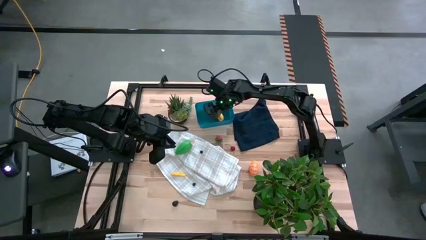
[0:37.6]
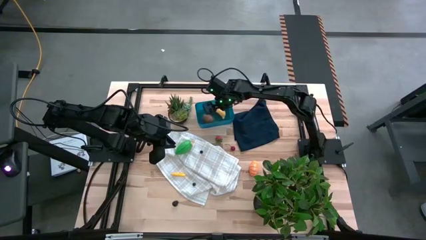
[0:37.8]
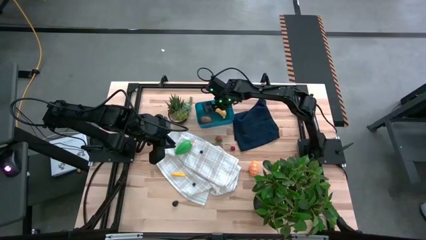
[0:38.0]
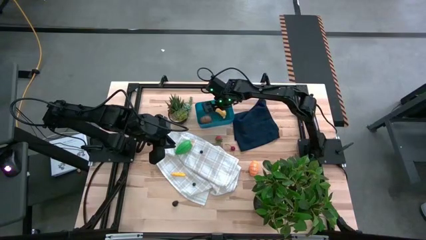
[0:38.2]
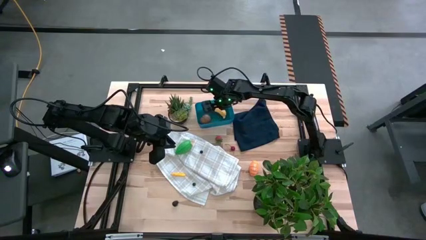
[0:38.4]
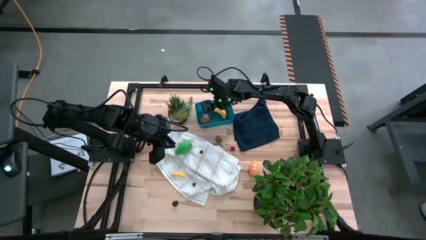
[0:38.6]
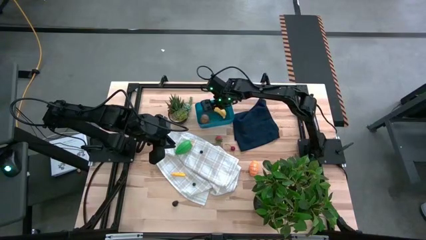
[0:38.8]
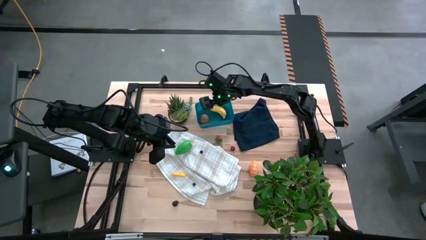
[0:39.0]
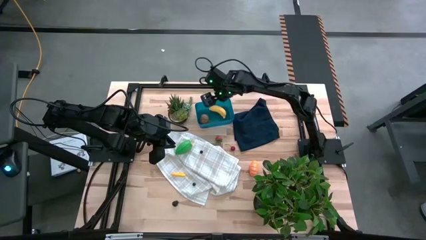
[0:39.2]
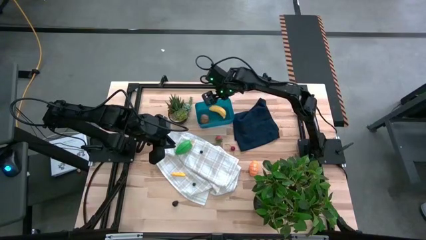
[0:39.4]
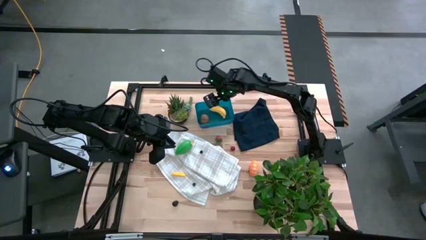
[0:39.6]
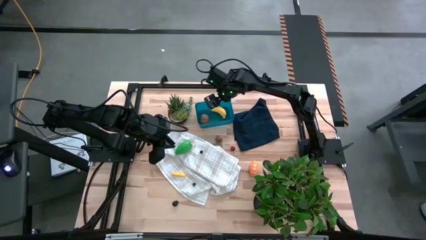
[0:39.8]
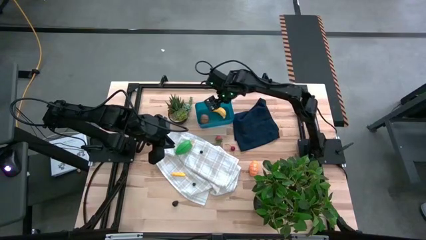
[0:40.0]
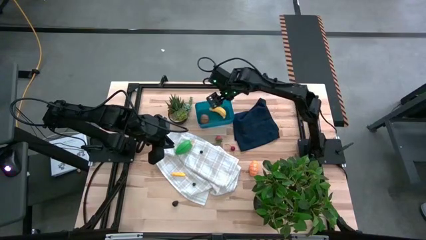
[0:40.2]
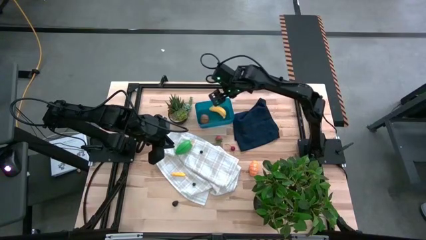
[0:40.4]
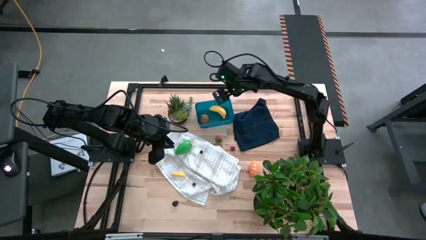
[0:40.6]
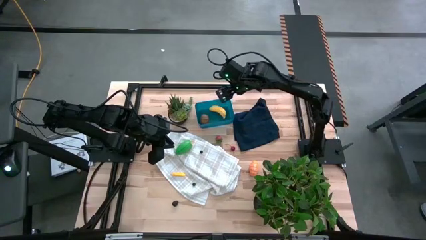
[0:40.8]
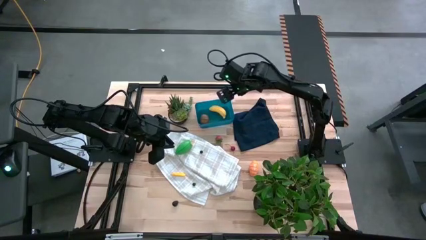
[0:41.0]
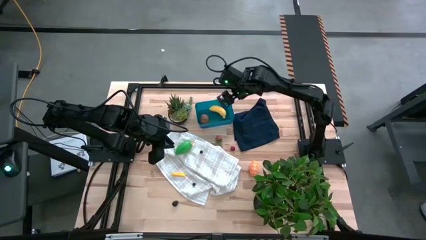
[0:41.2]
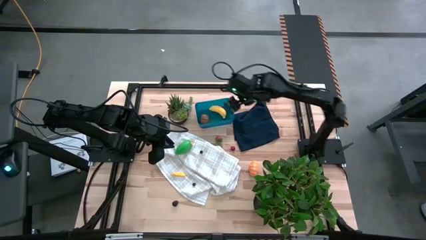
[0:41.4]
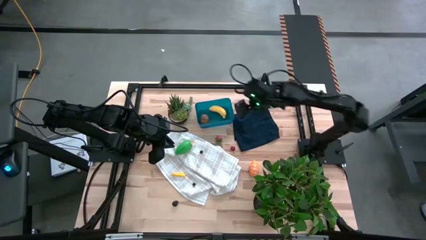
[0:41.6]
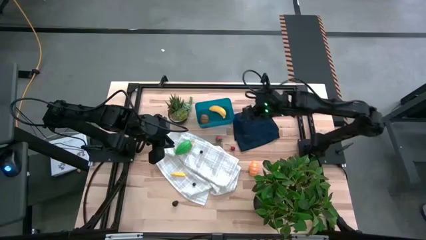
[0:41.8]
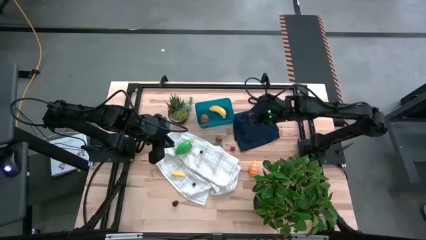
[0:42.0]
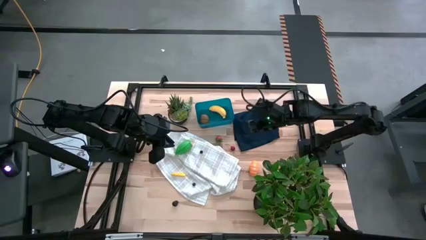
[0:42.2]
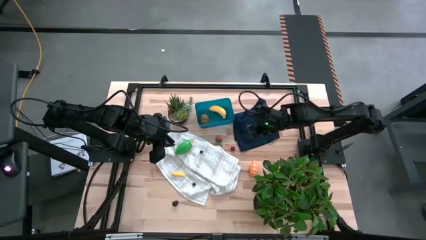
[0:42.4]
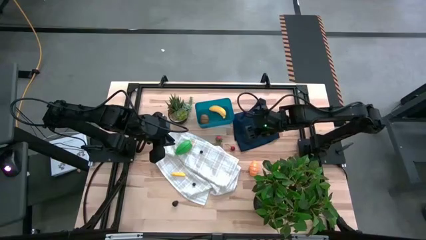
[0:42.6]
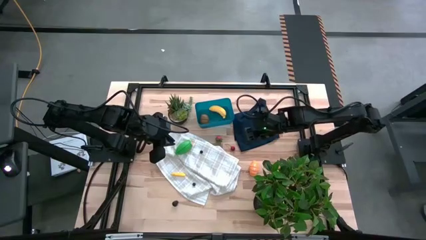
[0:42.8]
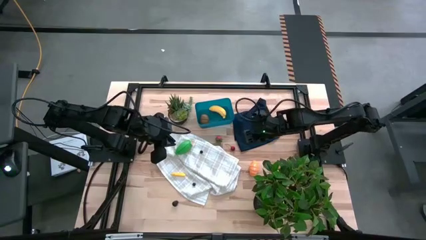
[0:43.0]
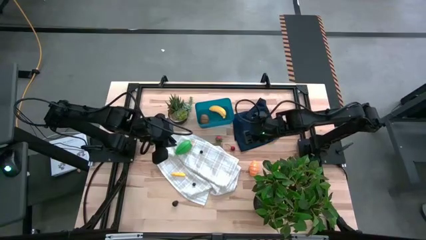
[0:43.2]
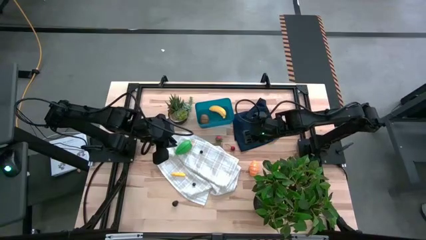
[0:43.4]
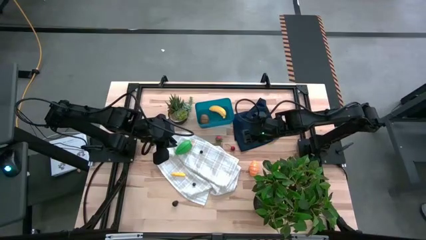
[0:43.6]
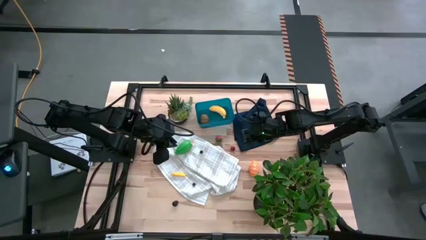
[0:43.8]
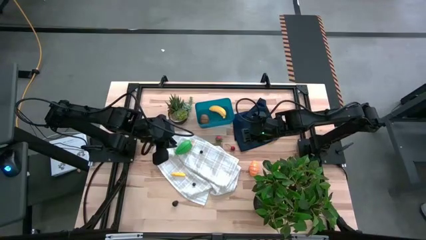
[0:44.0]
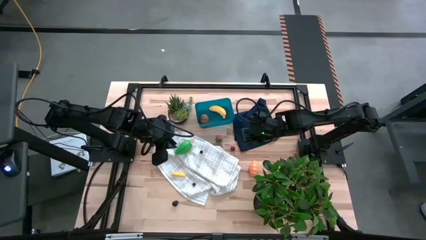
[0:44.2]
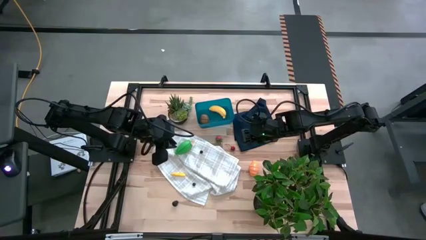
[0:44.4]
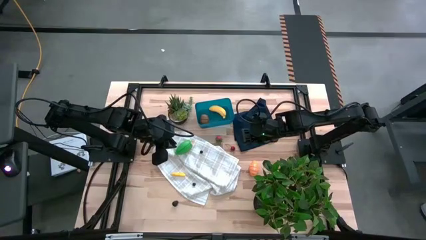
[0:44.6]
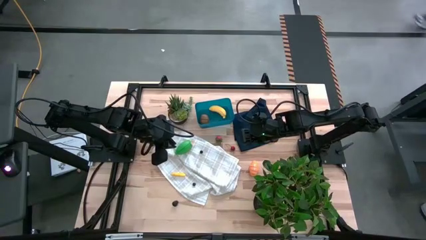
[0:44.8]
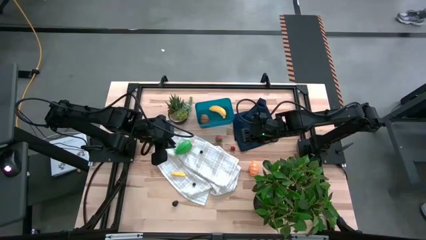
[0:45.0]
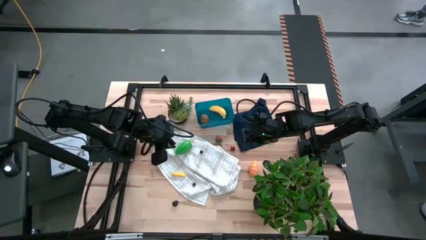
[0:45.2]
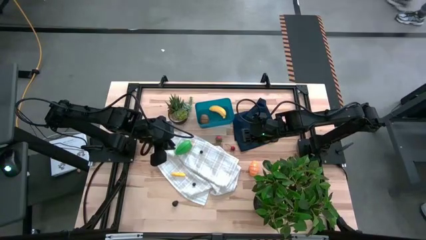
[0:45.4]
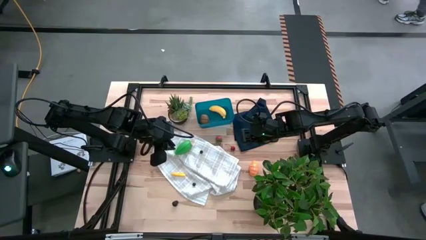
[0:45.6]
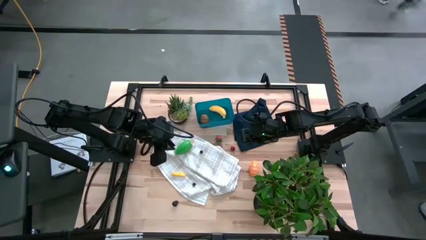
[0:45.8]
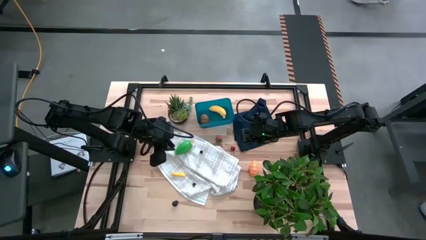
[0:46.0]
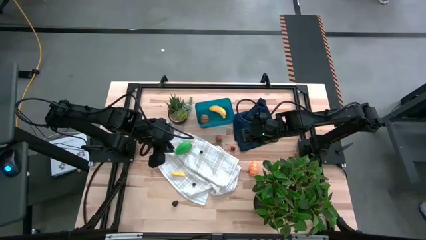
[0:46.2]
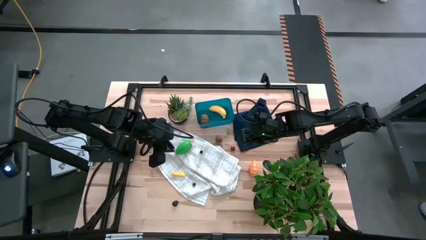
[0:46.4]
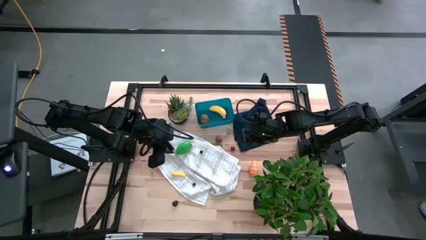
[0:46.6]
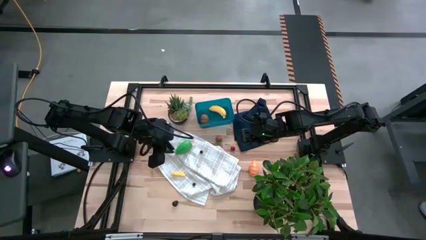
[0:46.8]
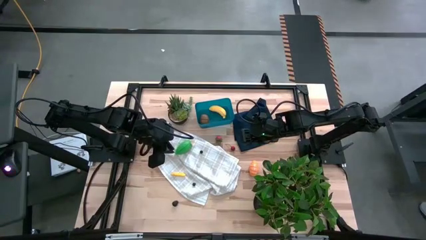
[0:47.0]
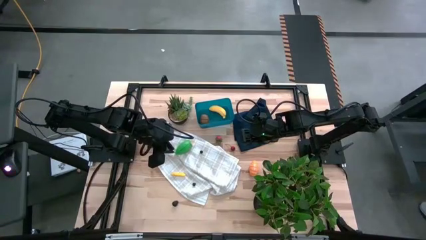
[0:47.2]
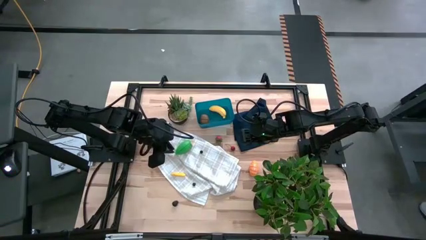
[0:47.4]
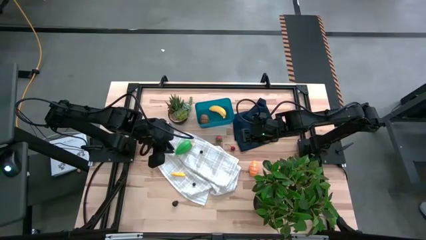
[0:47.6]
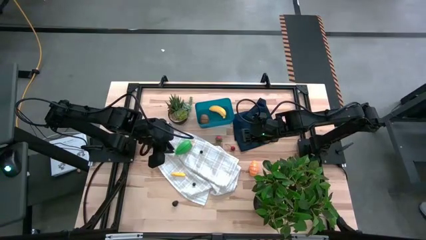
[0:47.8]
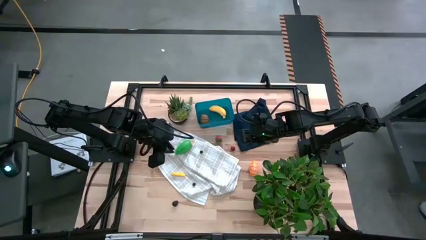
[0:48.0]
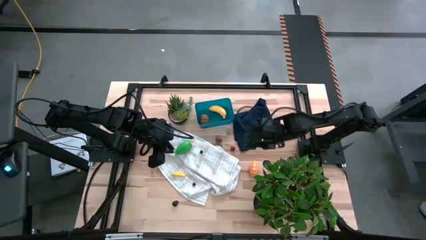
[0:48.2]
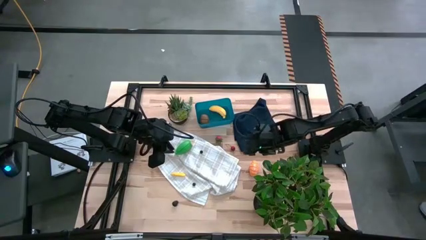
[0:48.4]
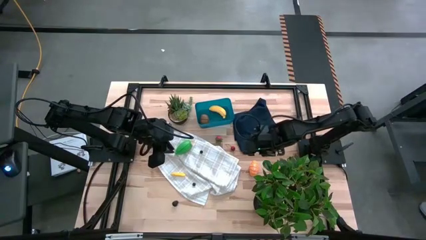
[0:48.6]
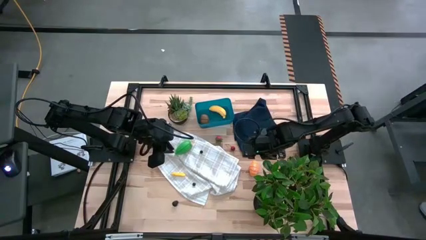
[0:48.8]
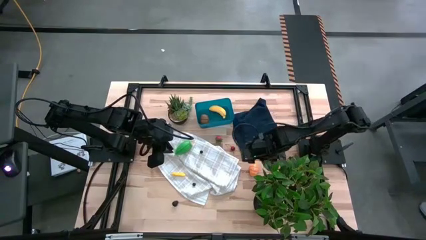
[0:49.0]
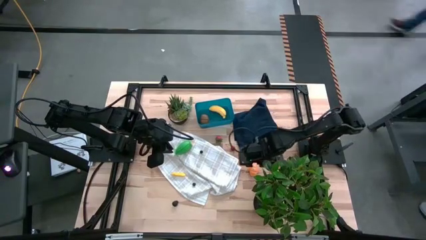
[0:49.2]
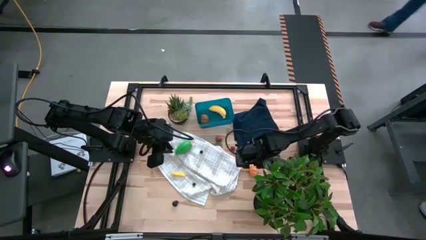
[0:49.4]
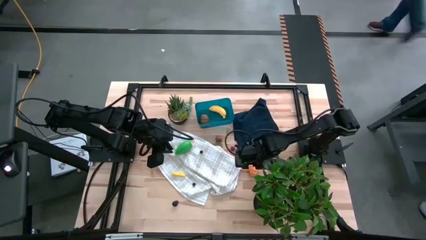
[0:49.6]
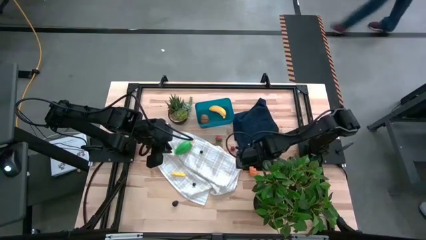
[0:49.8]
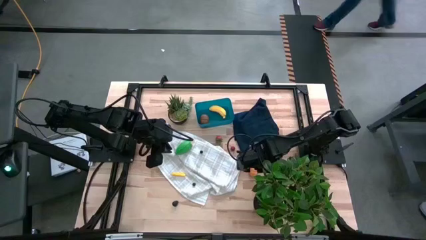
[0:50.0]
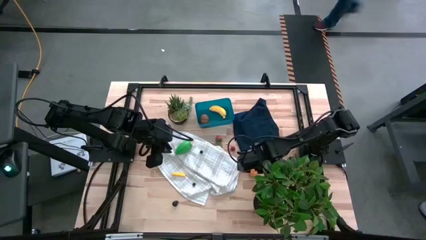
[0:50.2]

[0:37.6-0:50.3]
Task: Pick and placing Produce into tupperware
Put the croissant into the blue bin
